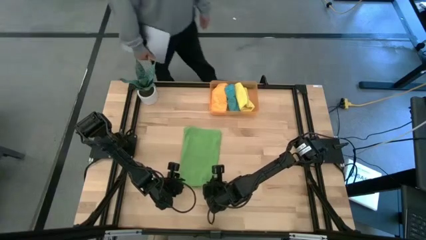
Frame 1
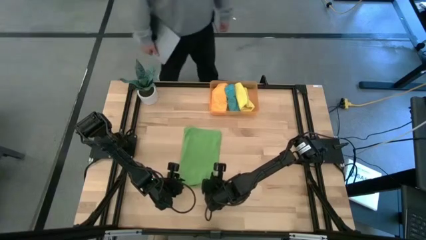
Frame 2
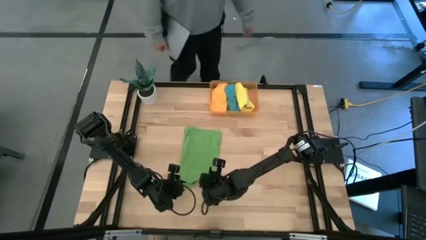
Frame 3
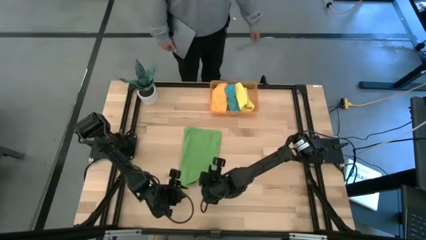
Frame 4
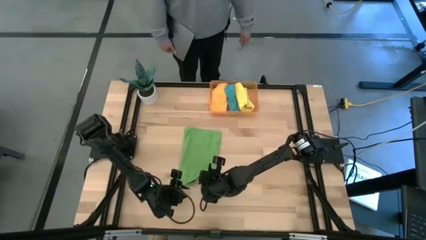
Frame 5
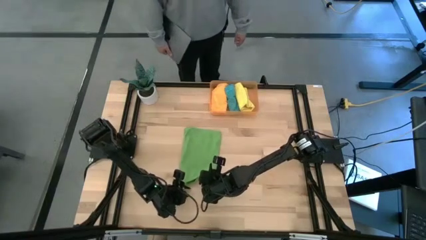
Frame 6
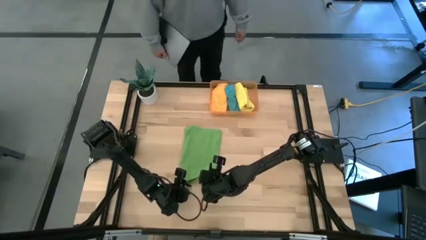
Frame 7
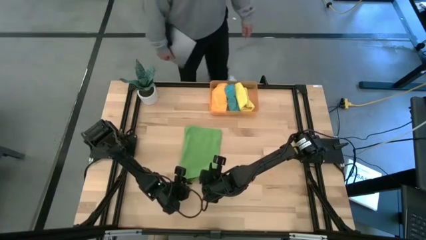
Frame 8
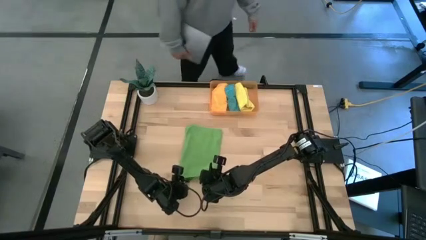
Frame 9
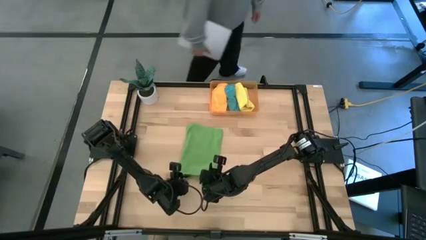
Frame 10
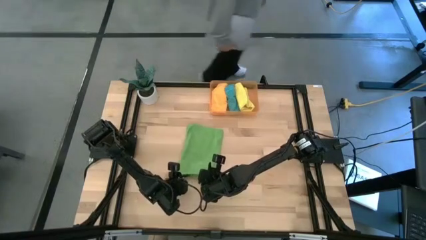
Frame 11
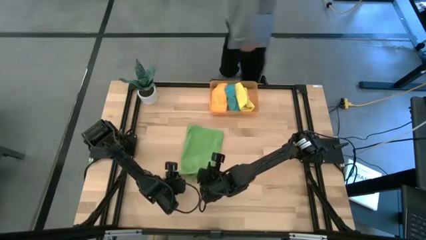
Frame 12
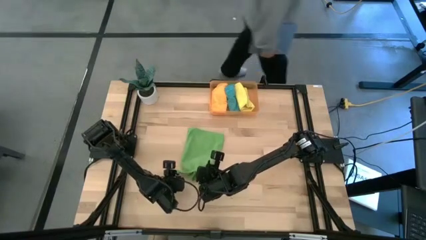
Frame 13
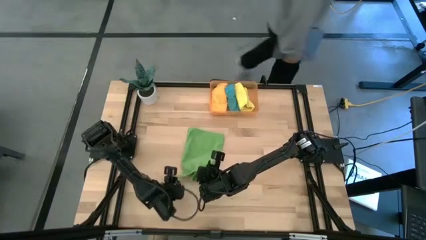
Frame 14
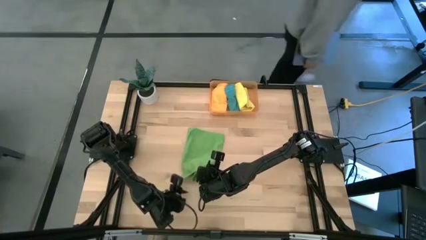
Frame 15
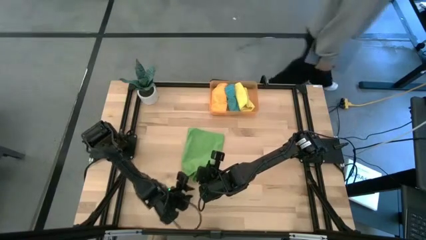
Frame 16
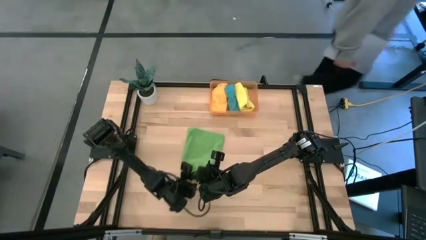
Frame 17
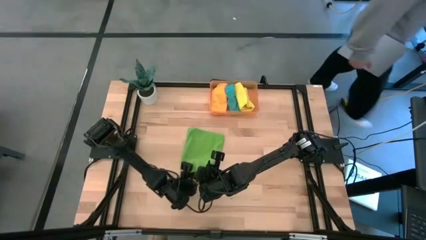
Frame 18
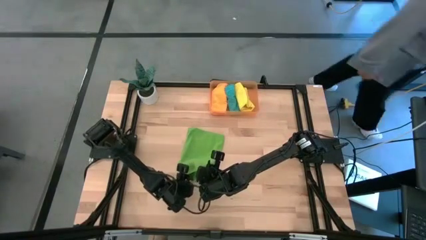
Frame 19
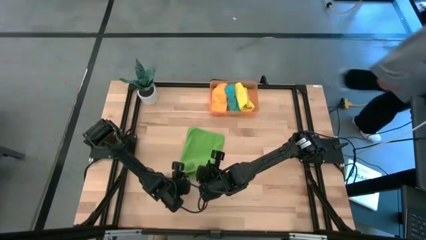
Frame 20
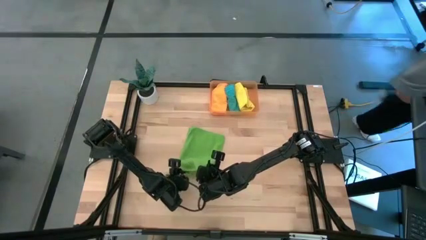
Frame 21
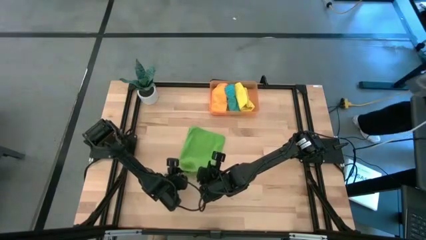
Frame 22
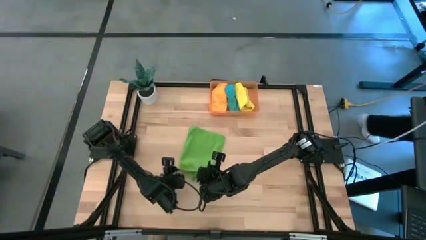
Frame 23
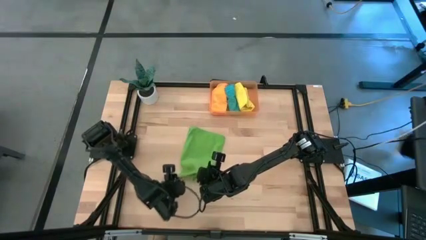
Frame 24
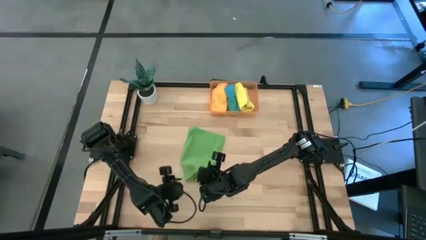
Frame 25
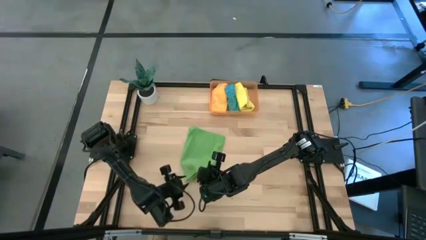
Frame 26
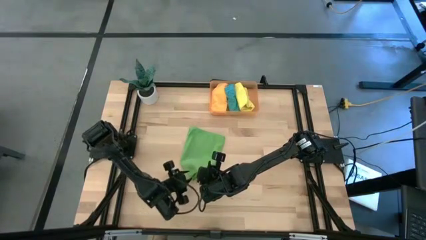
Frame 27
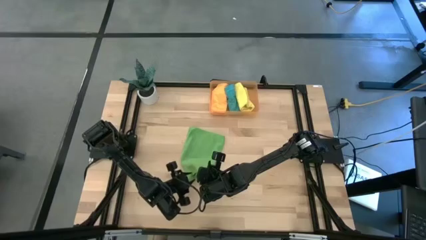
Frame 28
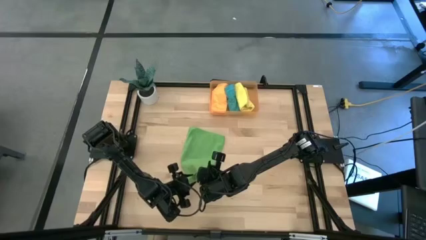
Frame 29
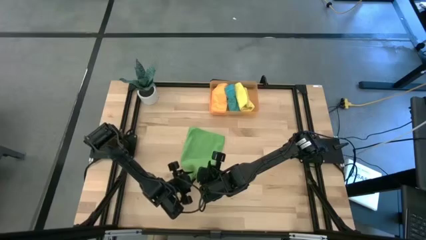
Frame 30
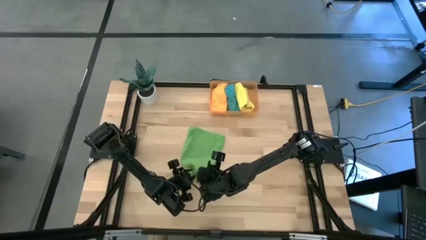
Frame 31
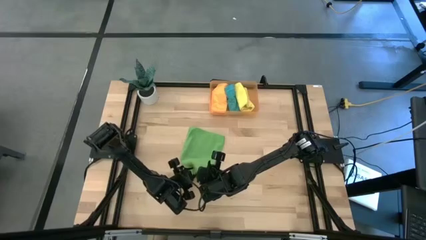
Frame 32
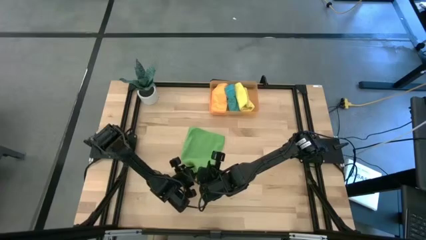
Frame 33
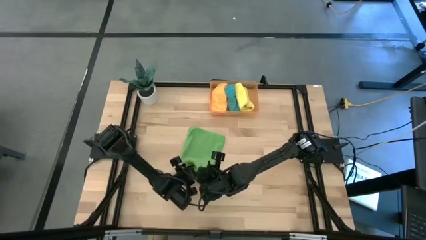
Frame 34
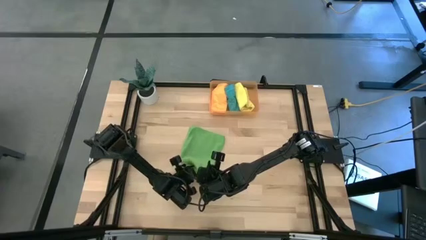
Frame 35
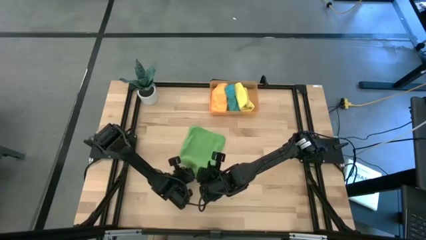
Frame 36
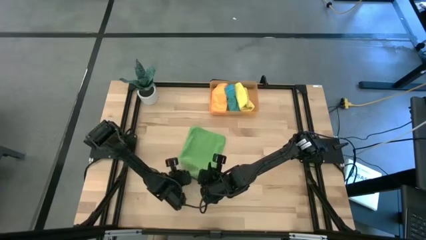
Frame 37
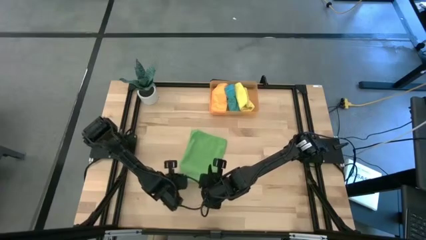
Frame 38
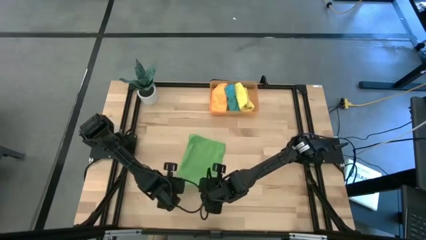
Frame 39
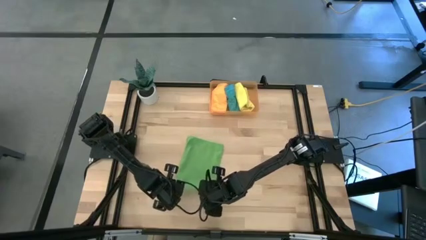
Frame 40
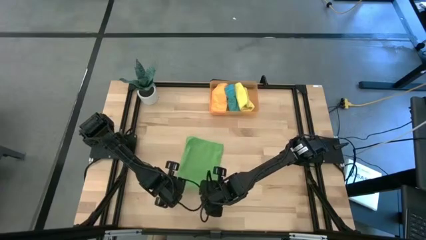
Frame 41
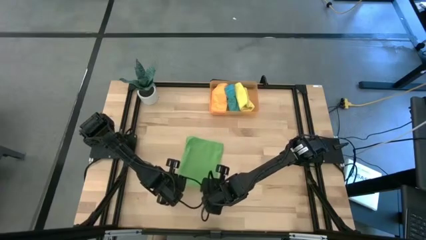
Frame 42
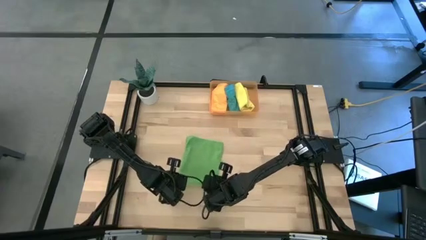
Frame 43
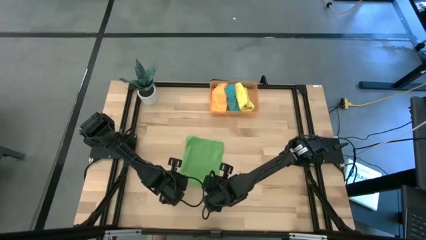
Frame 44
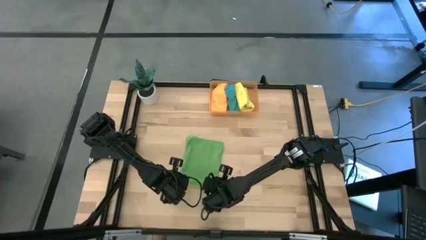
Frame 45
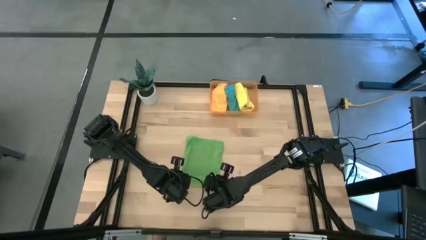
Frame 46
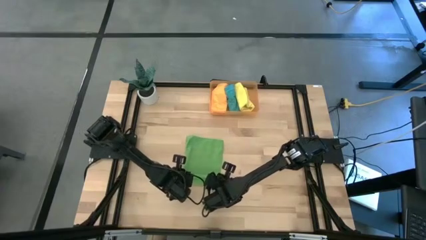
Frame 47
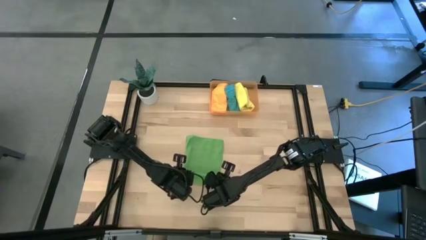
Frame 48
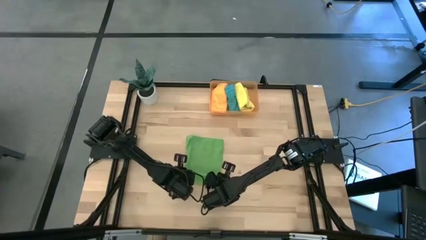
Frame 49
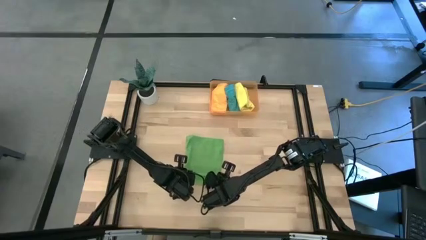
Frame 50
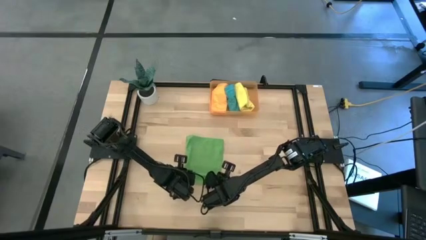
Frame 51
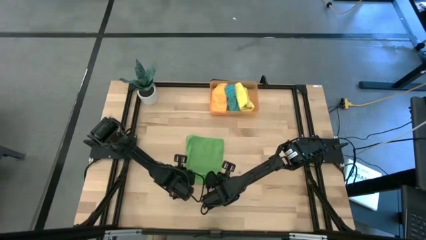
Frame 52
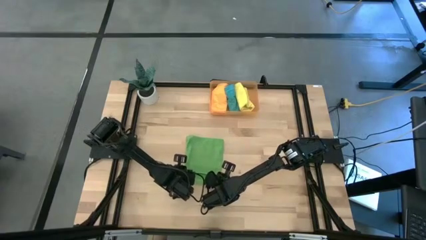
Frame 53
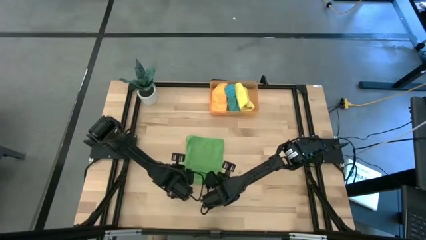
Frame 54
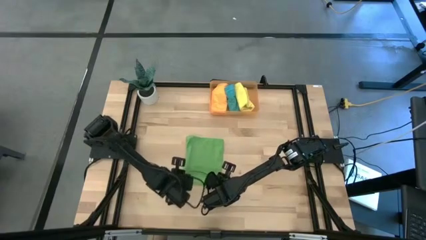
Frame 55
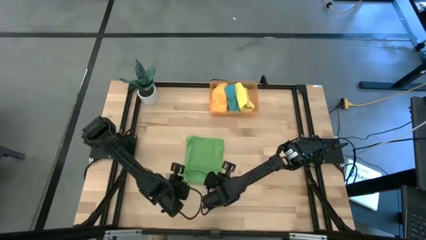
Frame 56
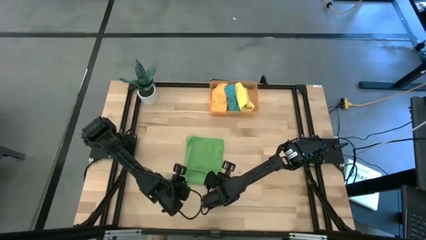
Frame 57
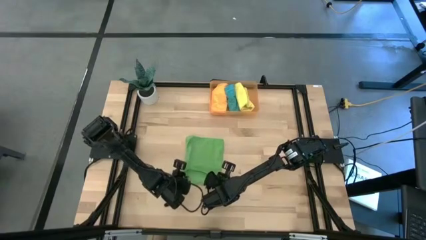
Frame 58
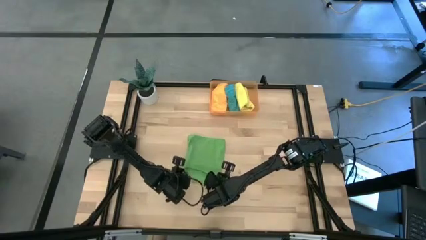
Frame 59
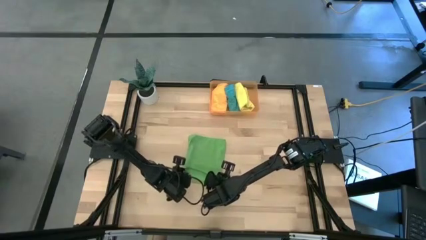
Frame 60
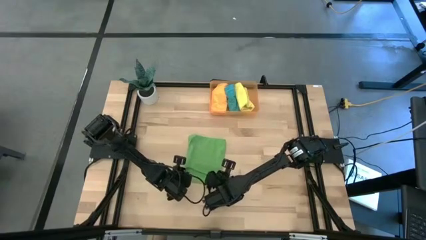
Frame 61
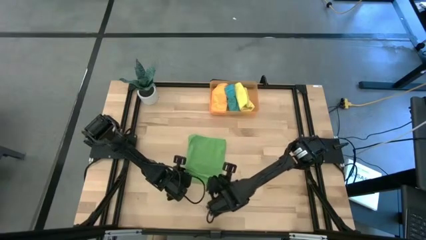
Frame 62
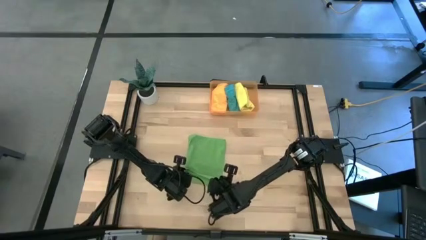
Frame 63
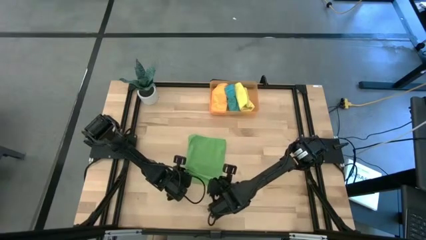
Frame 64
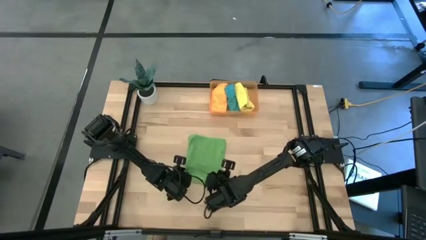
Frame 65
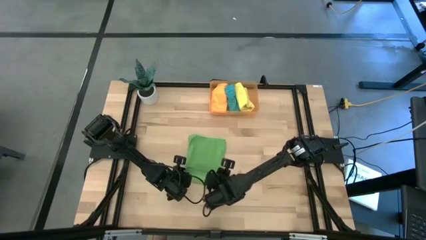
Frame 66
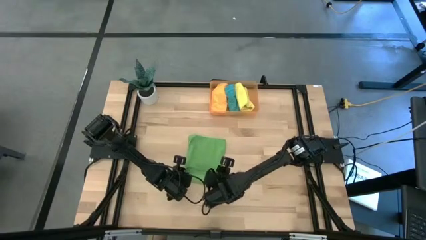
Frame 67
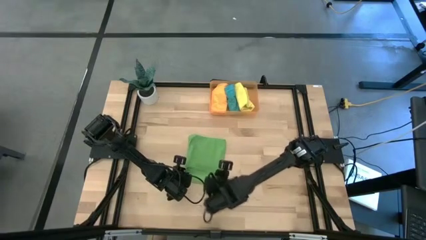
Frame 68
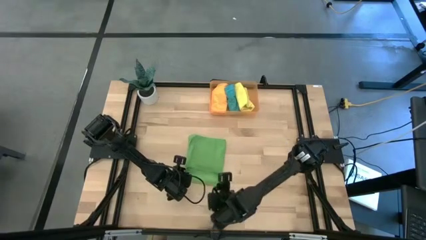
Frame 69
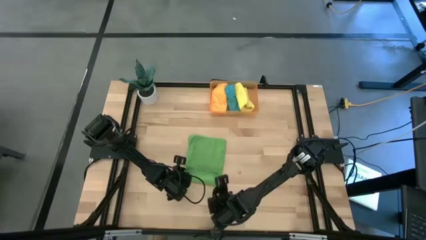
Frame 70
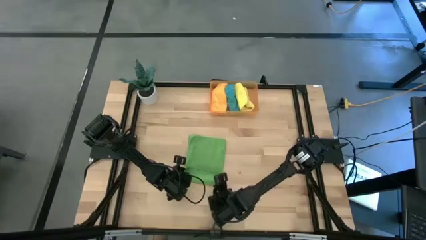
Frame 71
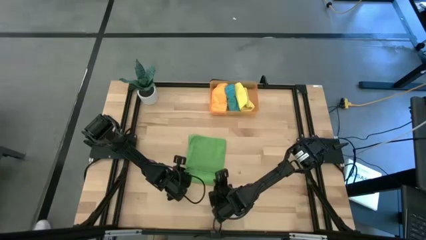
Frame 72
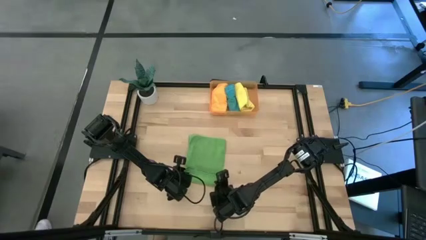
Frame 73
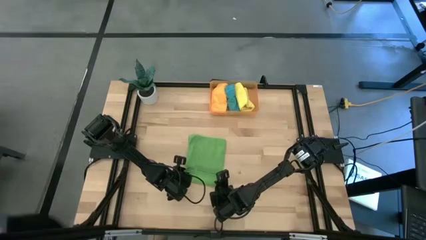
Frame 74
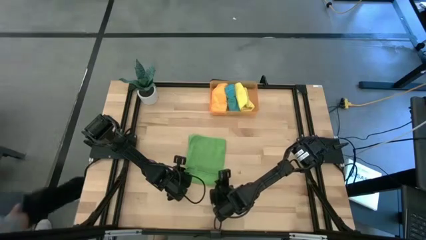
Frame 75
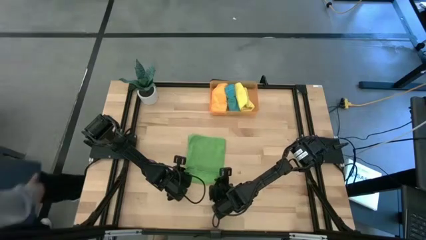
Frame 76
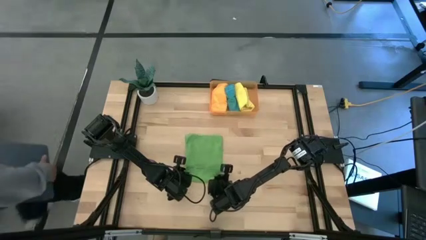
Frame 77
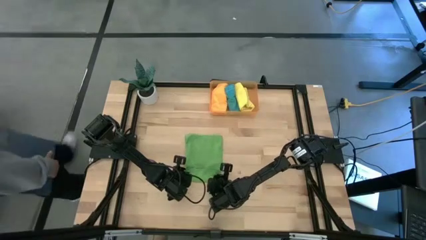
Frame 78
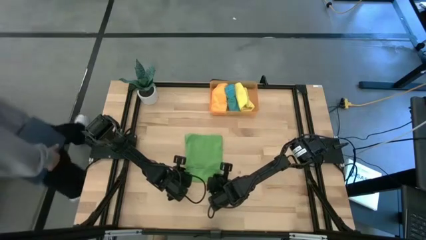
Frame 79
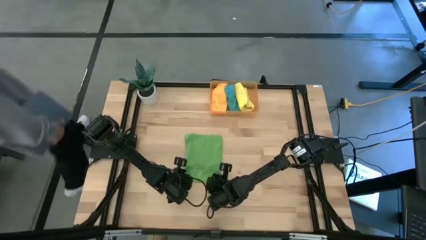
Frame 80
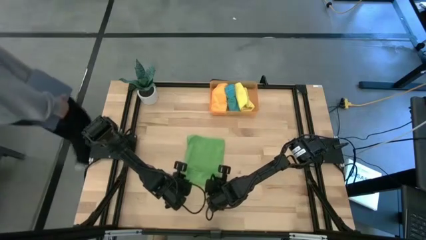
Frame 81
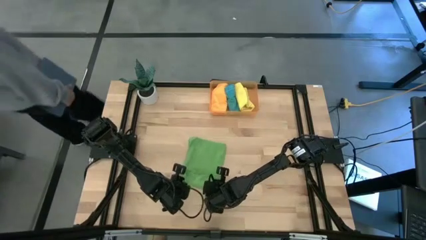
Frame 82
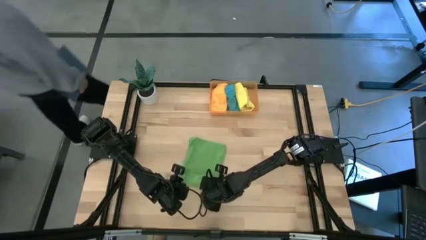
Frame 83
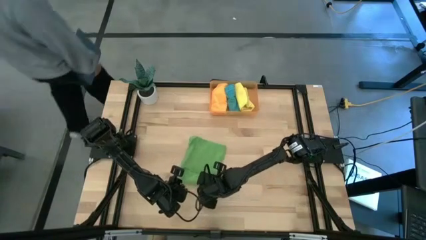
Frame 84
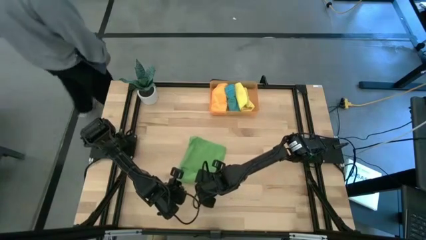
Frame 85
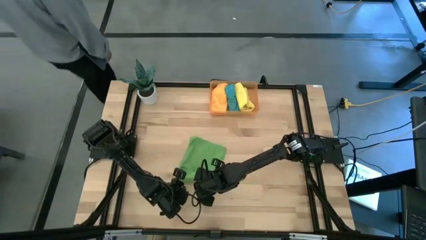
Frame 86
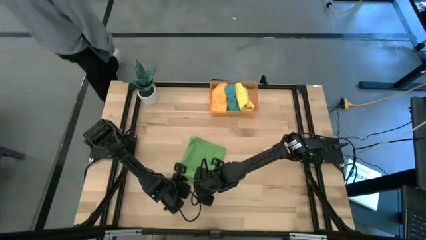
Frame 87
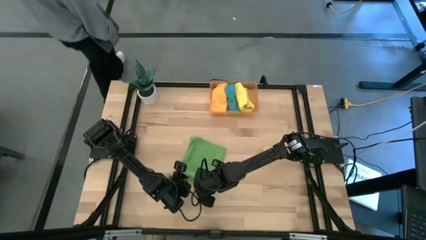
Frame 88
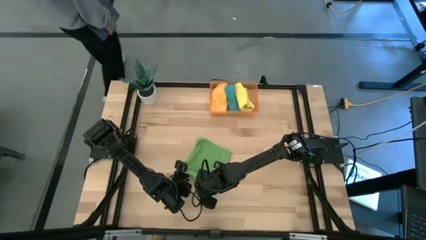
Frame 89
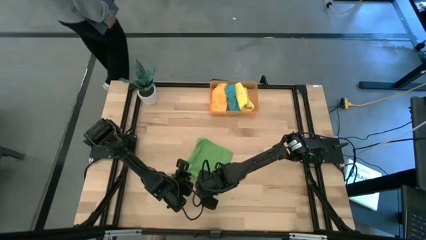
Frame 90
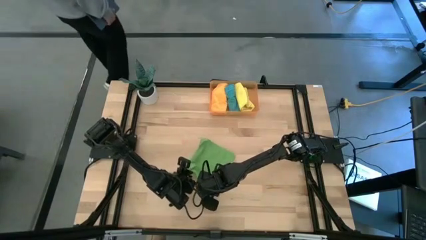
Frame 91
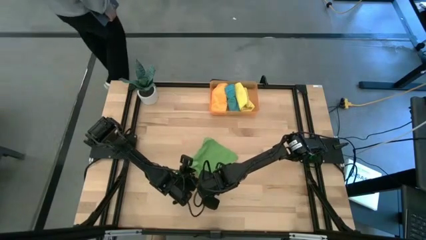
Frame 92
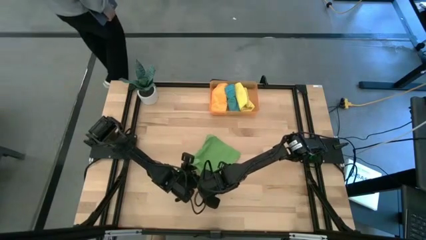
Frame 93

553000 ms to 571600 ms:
Task: Roll microfiber towels into tight, uniform cylinder then place into a basket
Roll the green microfiber towel
